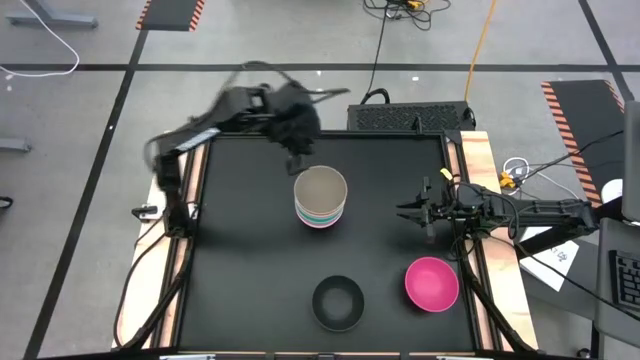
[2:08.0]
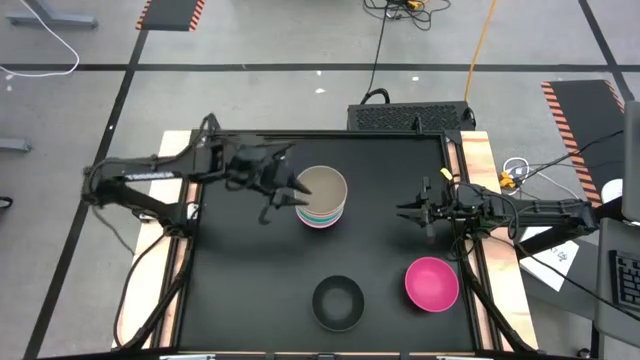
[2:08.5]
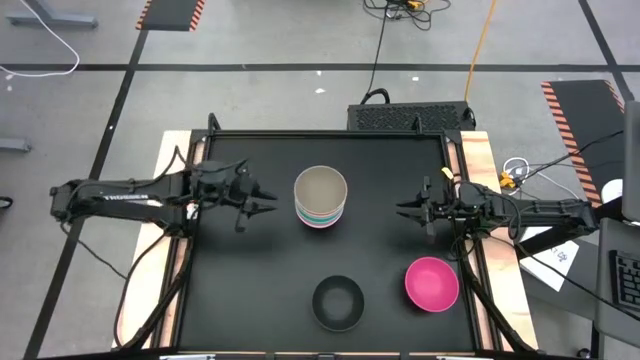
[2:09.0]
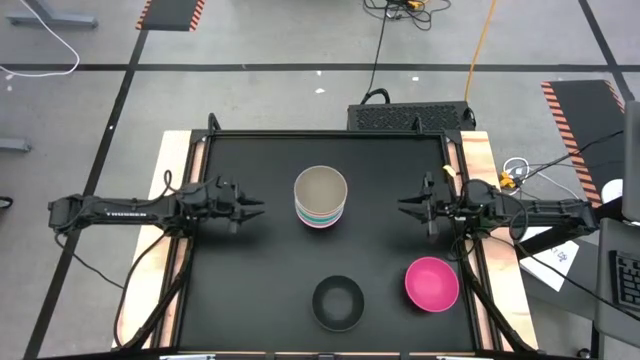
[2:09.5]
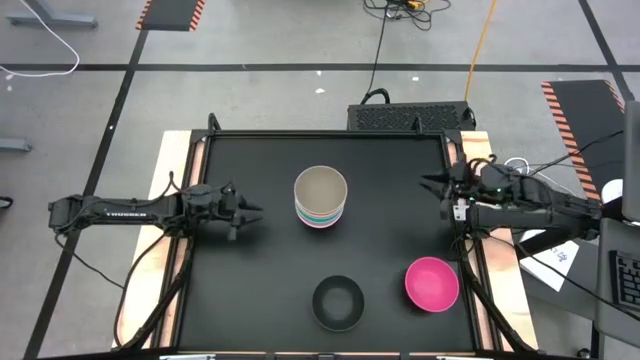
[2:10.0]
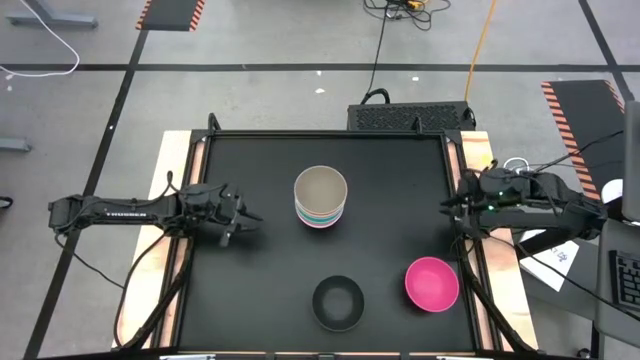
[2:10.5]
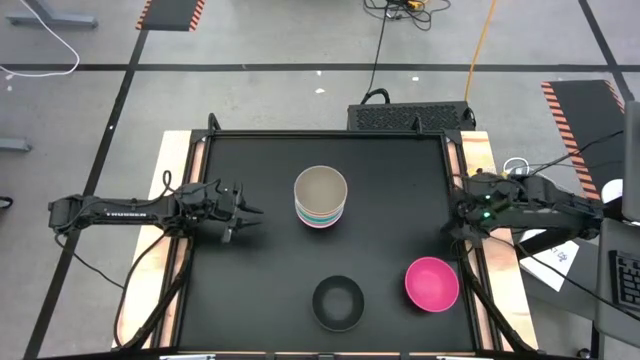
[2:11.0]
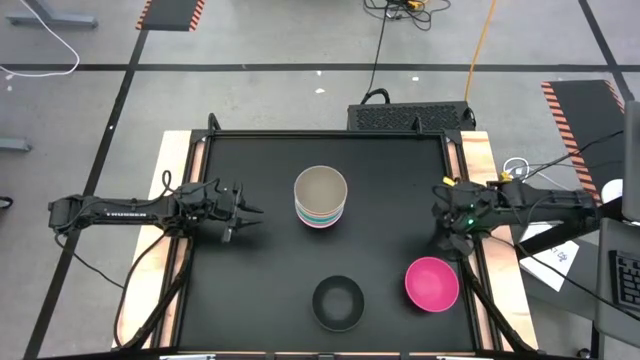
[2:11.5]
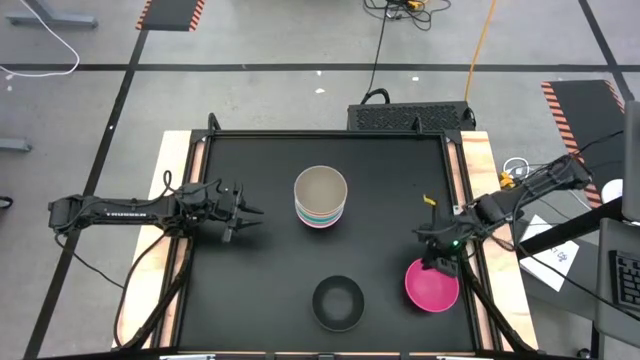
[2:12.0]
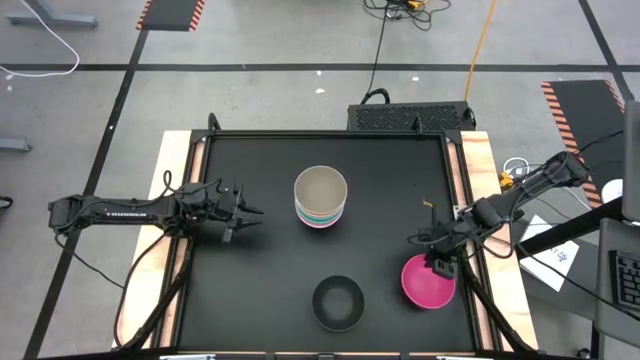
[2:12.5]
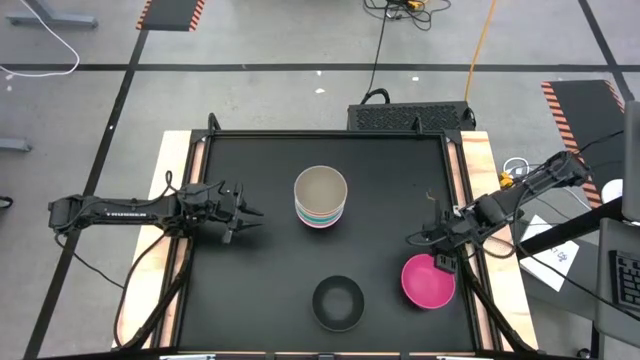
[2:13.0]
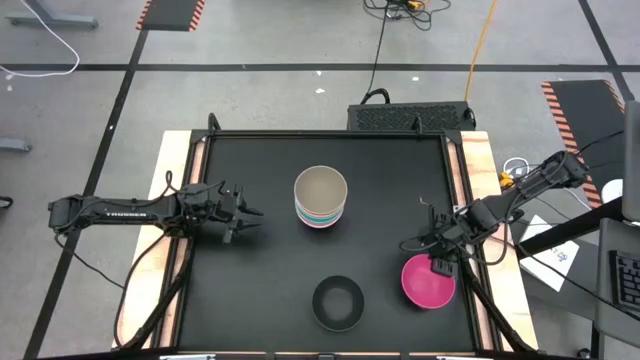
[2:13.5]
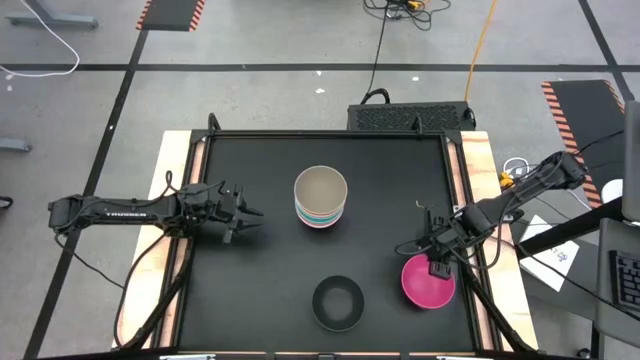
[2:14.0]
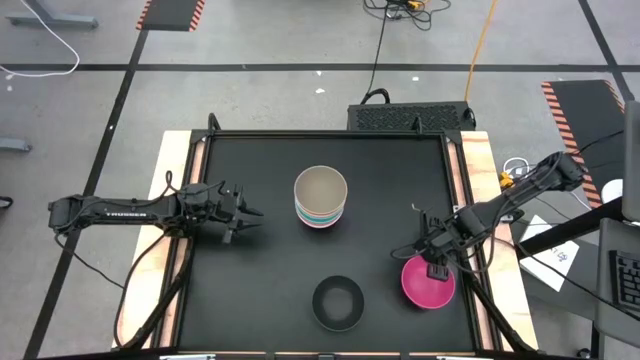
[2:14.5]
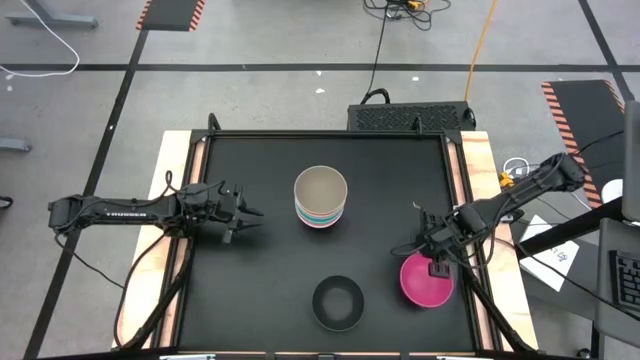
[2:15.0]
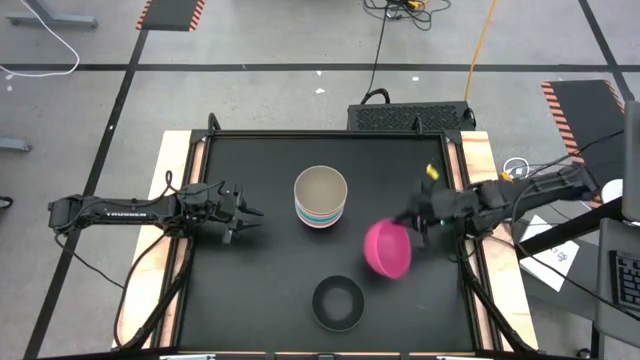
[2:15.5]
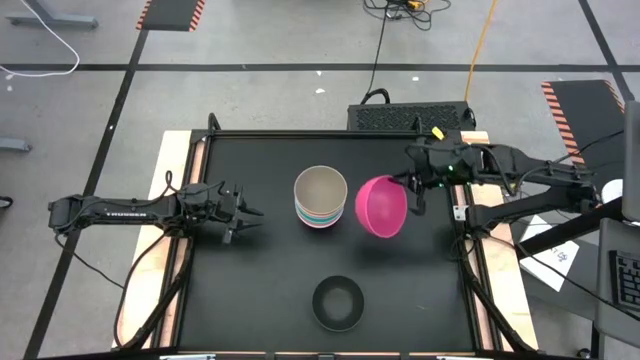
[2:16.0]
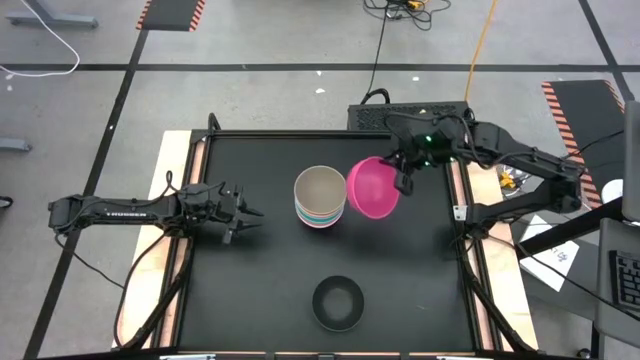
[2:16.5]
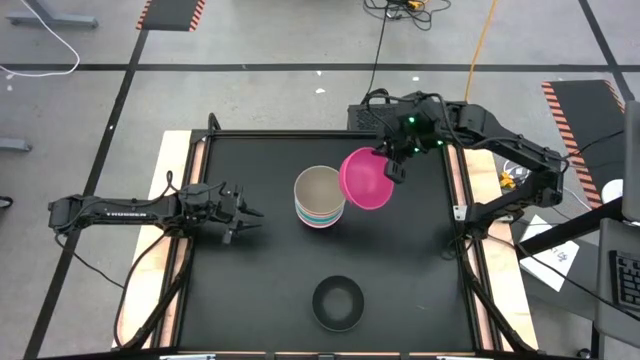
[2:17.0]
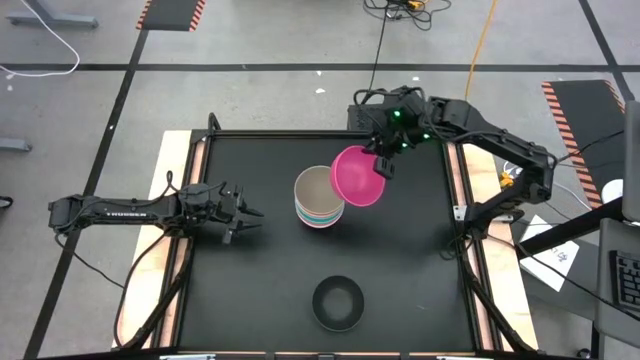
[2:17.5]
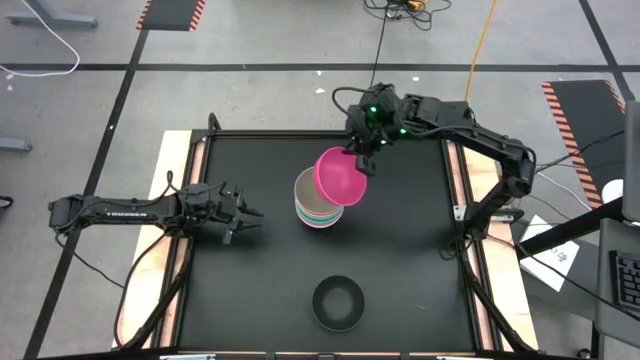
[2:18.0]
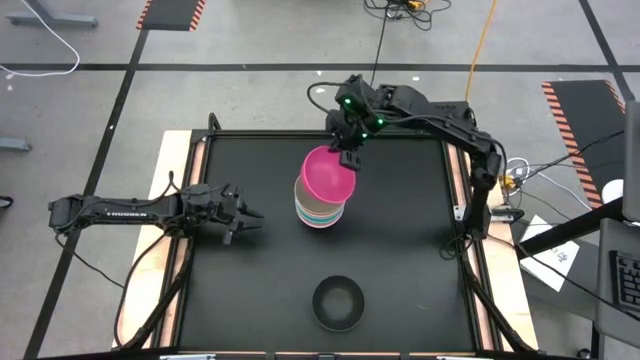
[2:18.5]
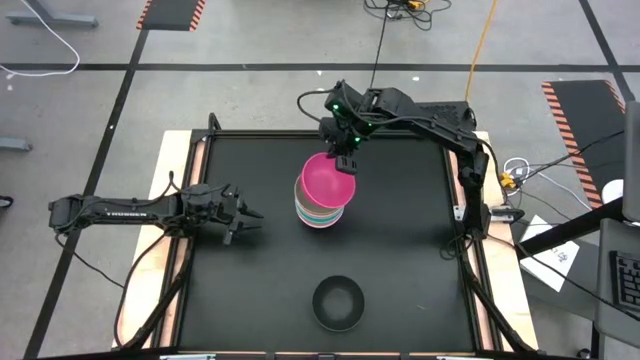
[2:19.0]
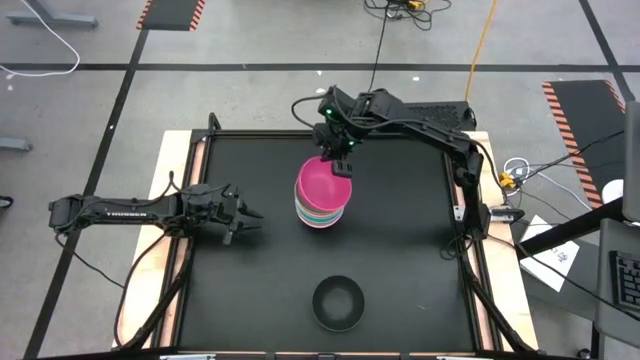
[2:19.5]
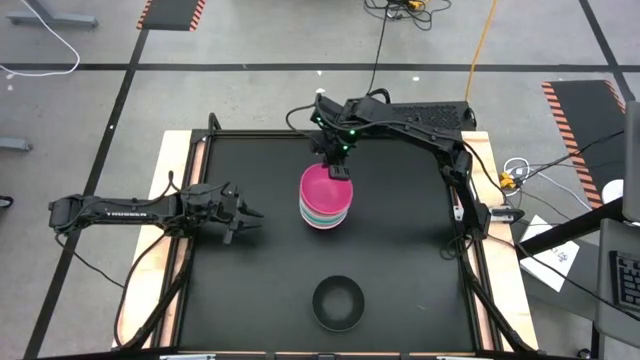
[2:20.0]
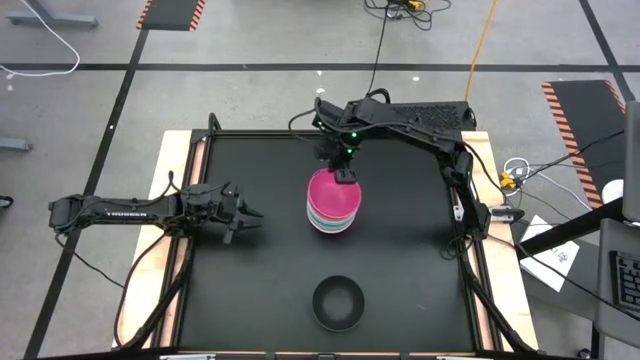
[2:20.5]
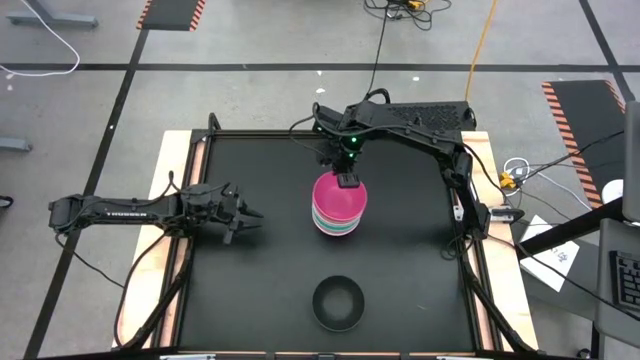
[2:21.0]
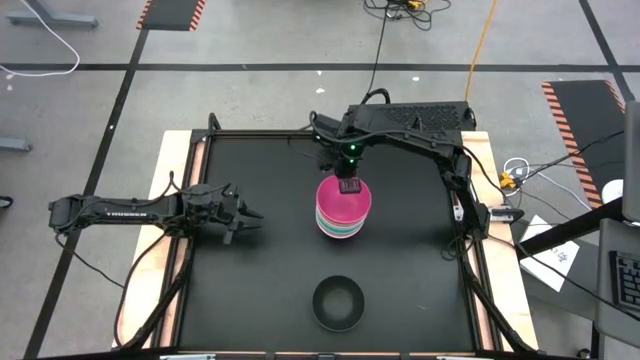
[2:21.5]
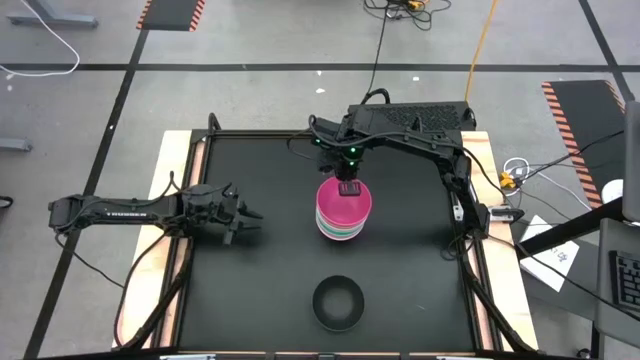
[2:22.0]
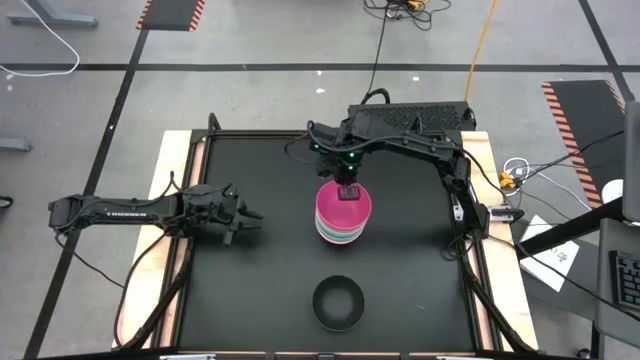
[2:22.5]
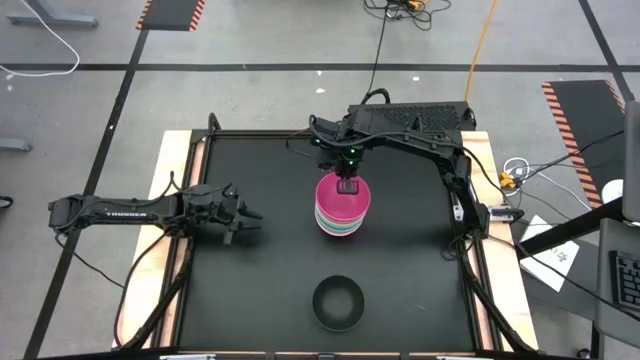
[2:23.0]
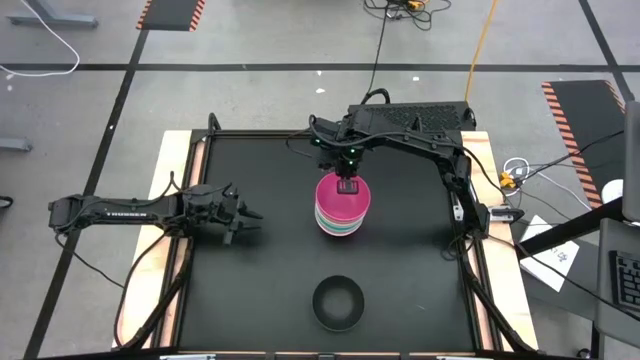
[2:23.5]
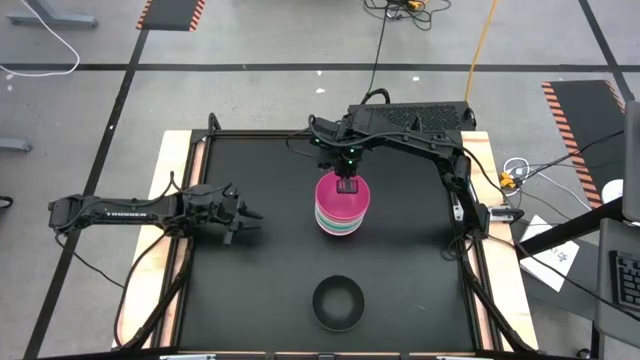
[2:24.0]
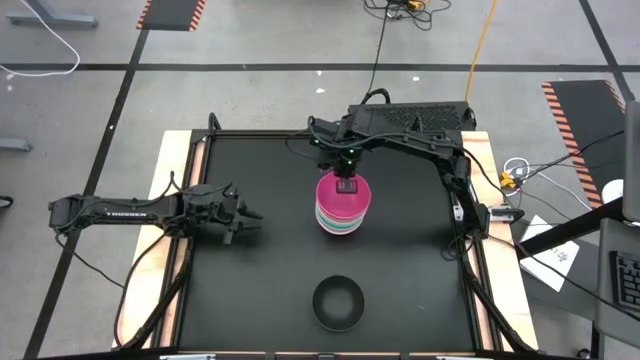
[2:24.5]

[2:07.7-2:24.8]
Task: Nest bowls inside each other
Stack the pink bowl on top of the gray bowl

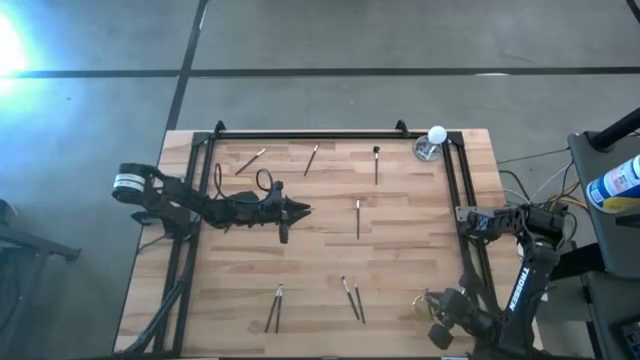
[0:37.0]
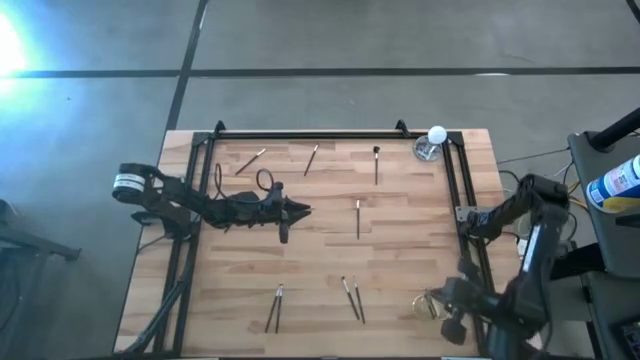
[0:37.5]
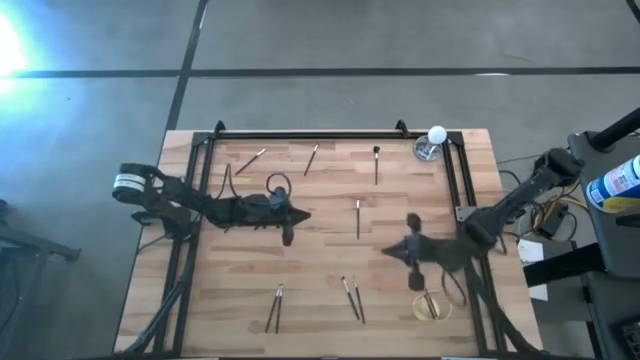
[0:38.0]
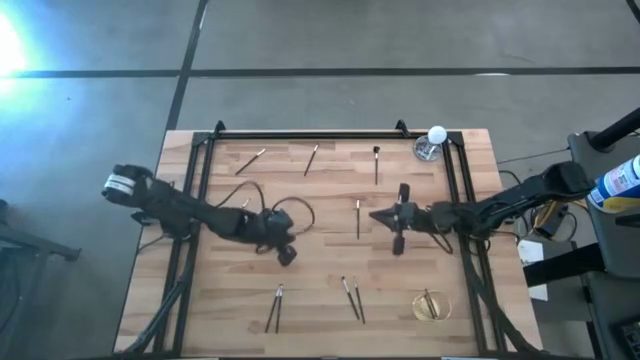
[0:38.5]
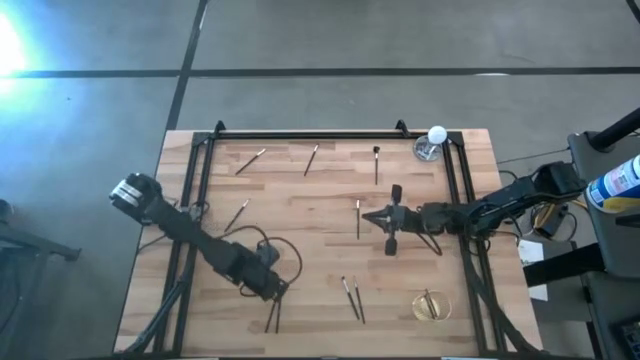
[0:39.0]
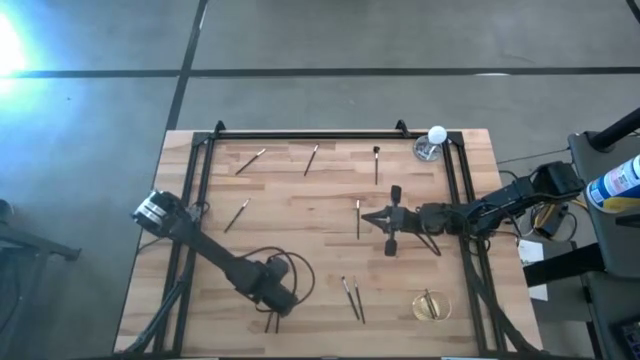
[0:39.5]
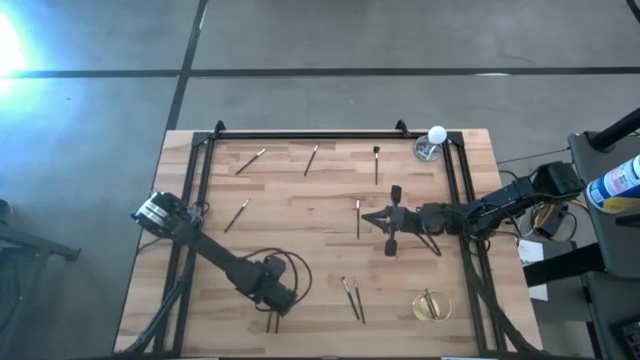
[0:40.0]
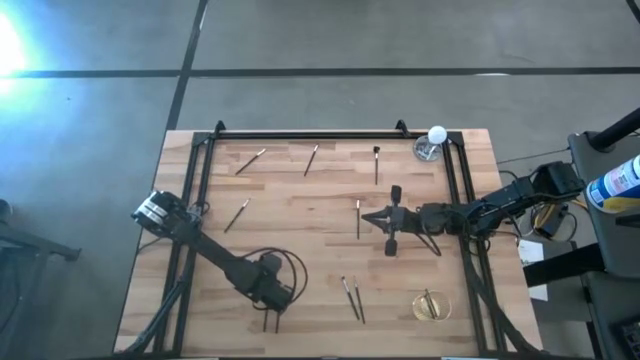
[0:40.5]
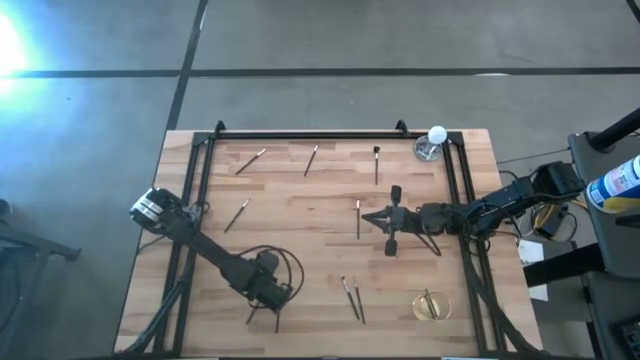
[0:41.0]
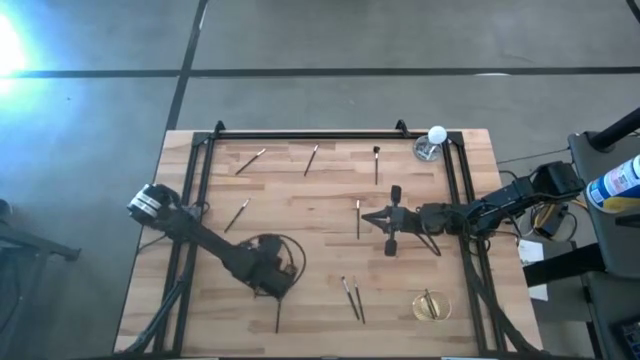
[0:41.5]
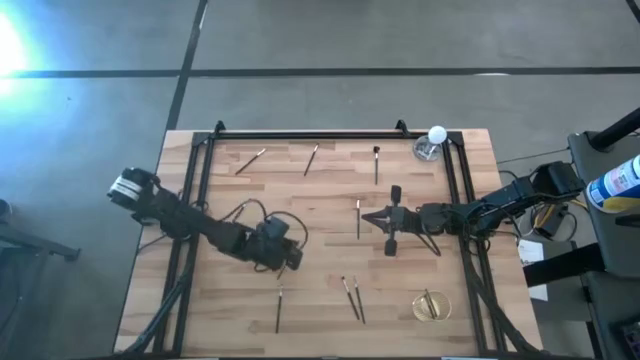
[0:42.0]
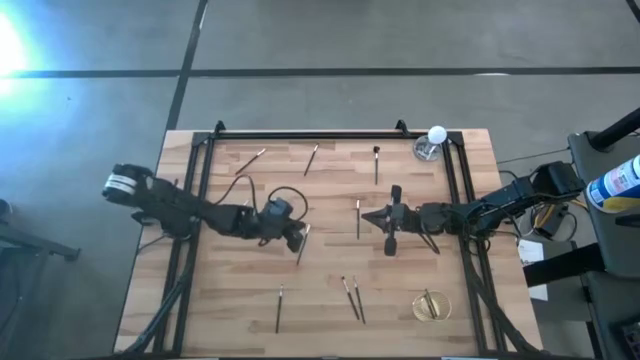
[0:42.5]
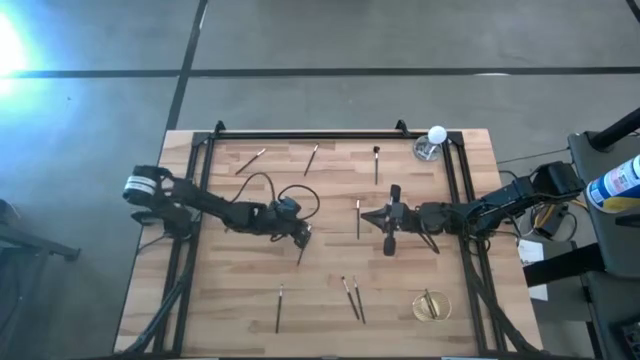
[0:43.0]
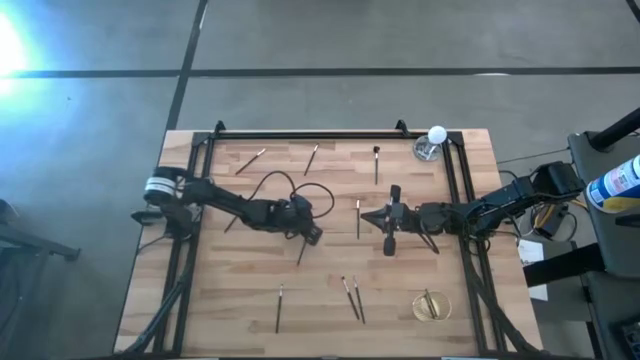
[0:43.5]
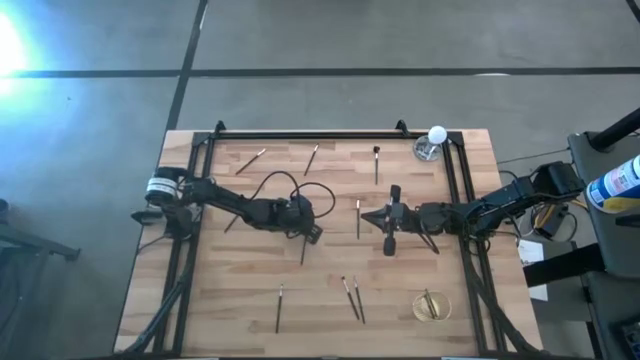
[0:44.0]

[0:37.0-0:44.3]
Task: Pick & Place Makeup Brushes
Put the eyeshadow brush into the makeup brush holder
